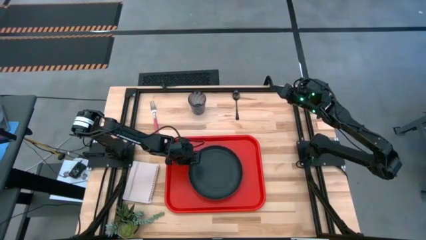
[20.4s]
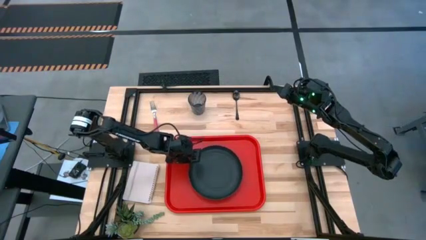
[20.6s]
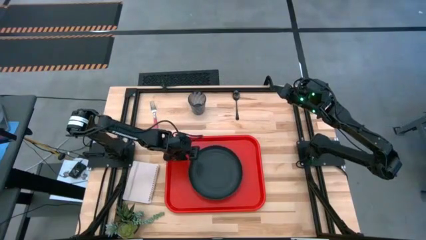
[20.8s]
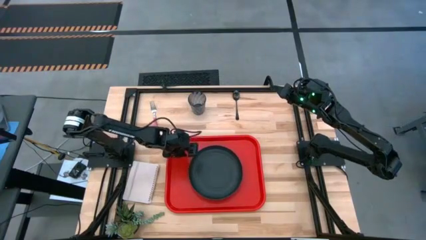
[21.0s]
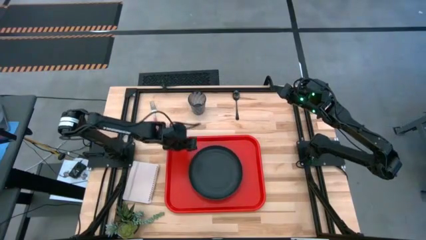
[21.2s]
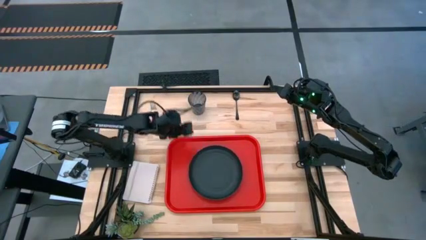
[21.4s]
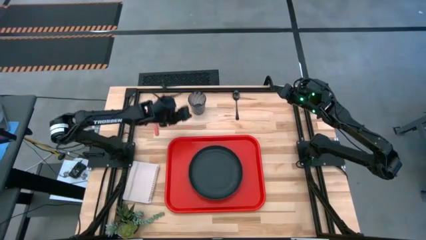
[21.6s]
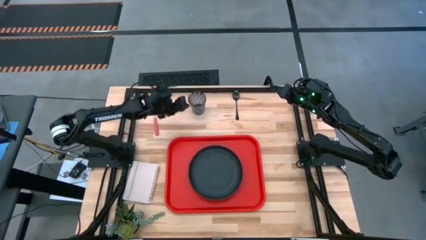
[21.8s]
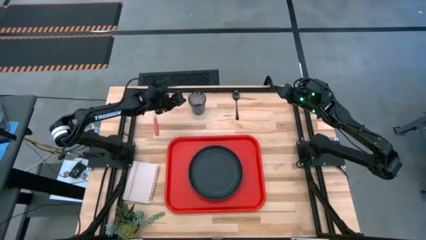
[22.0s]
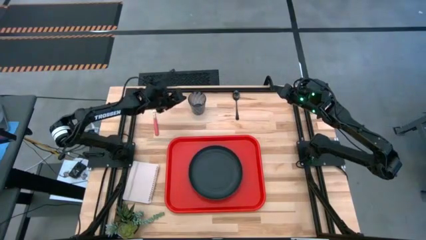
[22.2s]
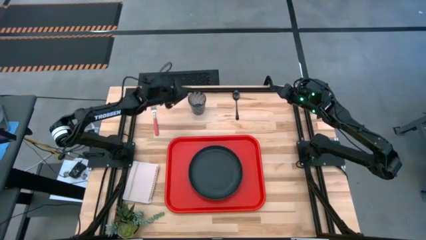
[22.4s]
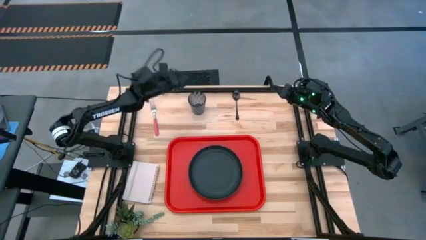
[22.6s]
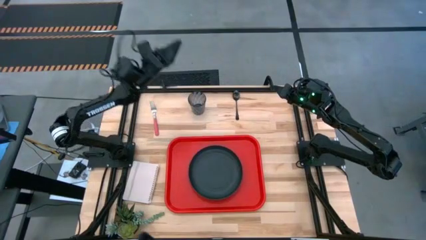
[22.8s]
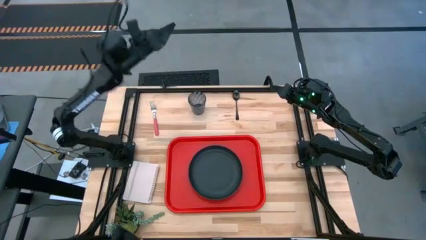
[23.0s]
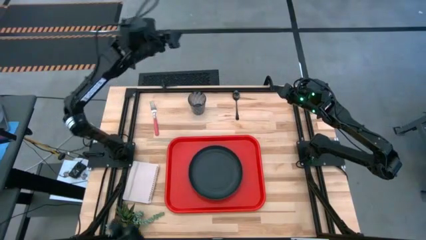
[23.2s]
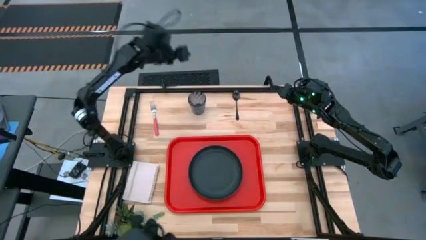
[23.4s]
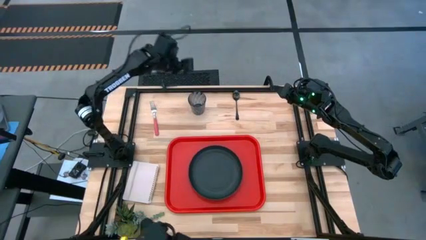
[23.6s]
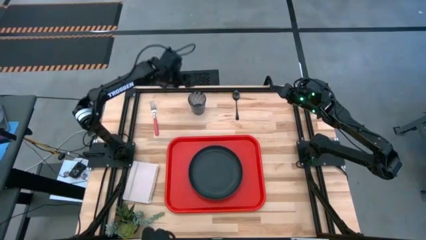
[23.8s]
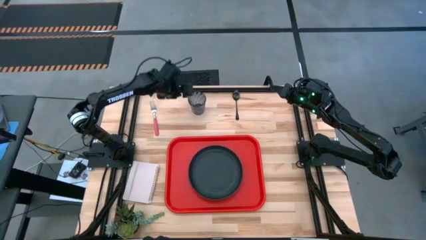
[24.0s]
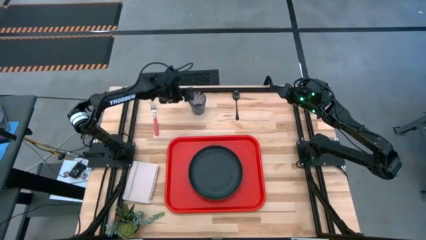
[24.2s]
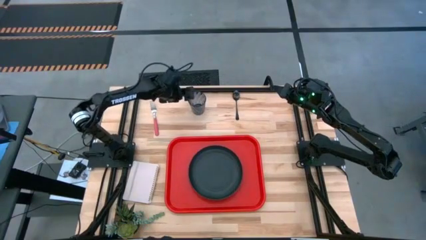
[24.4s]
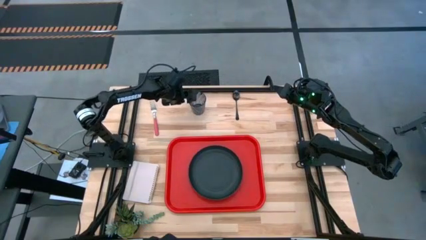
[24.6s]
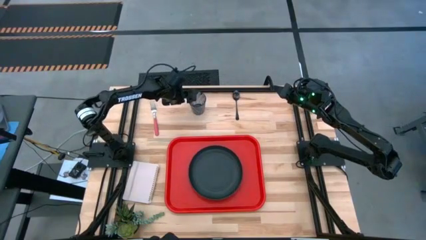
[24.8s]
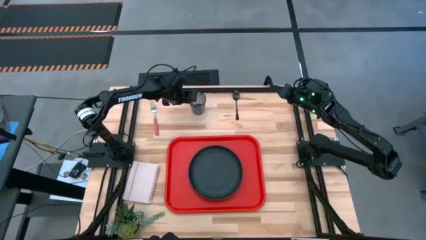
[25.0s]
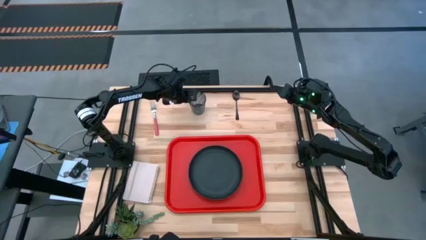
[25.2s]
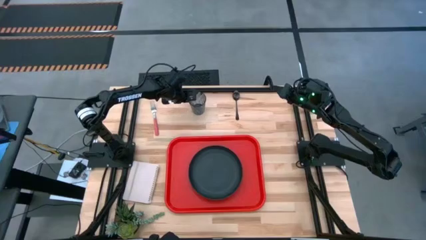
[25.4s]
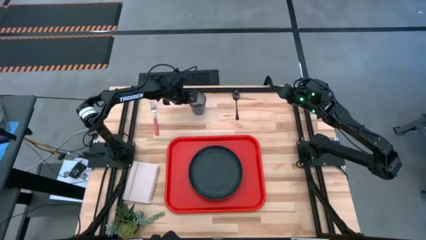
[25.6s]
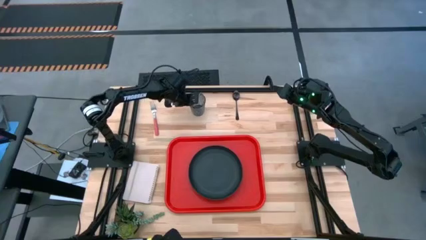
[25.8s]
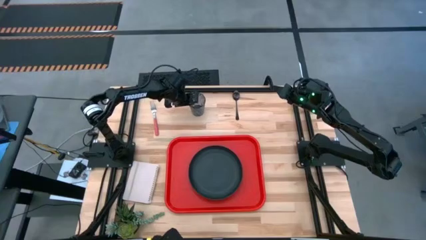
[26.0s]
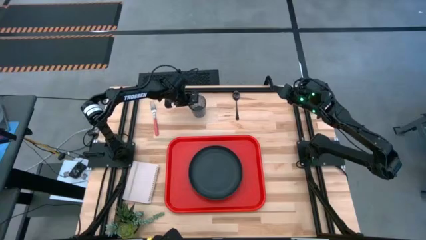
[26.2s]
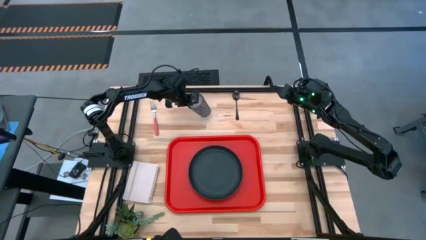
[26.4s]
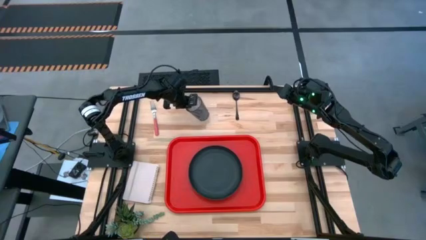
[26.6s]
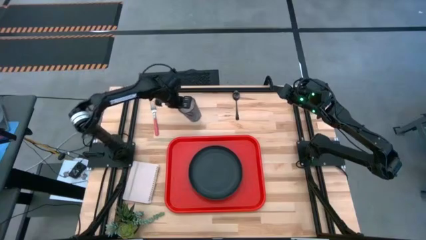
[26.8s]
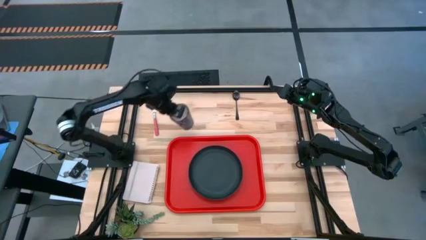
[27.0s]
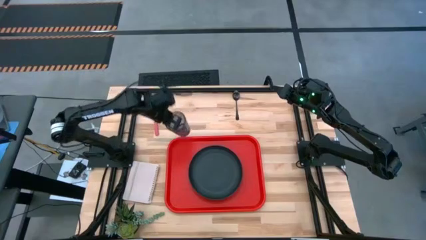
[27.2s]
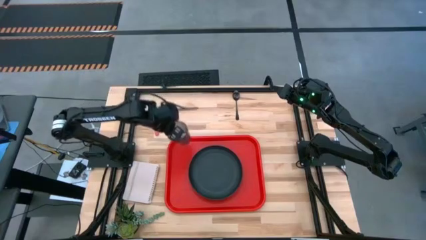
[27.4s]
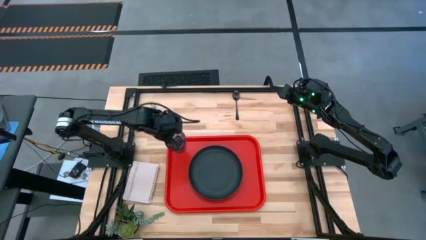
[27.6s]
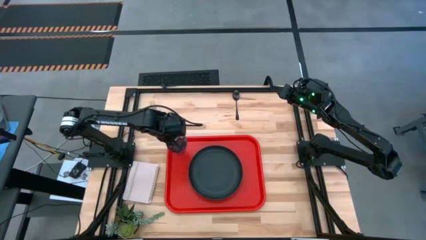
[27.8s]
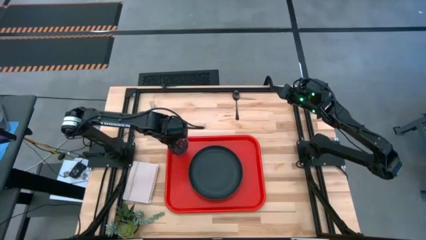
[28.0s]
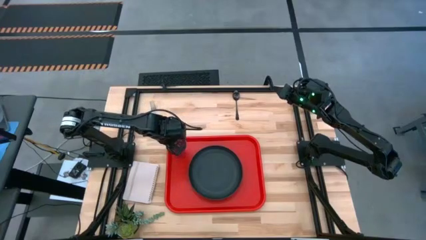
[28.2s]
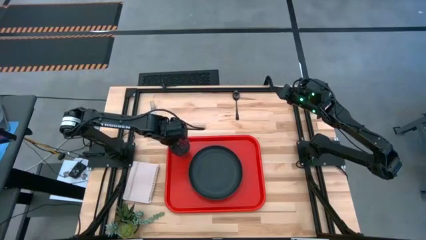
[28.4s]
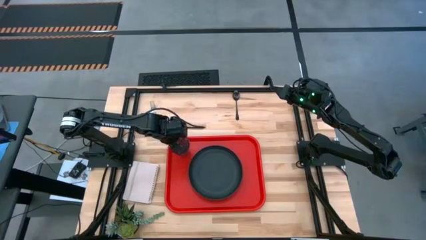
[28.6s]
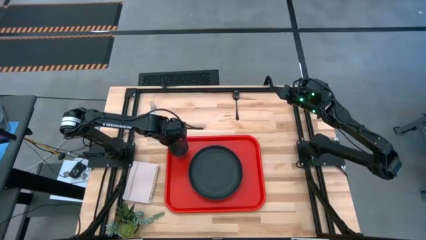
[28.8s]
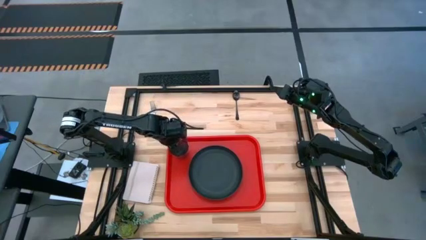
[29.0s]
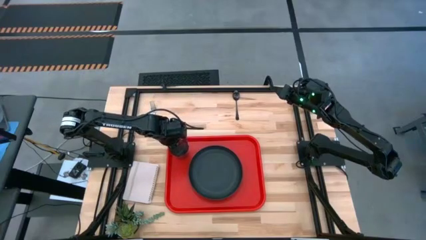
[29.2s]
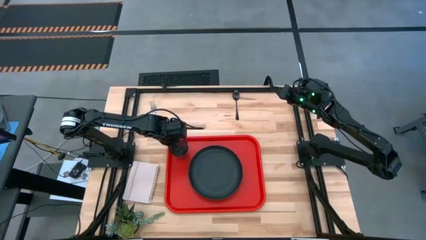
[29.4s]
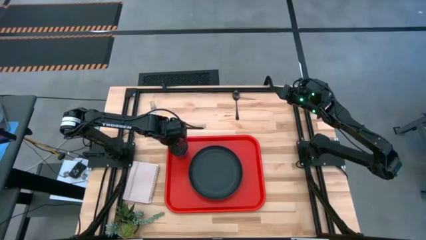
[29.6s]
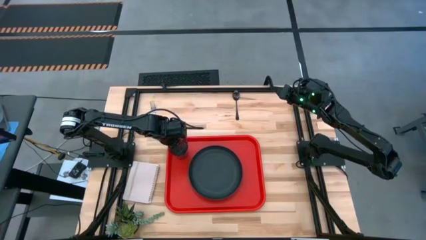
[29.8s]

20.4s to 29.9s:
Task: Pick and place plate/cup/fork/spoon on tray
Put the black cup on the orange serving tray to the top left of the black plate

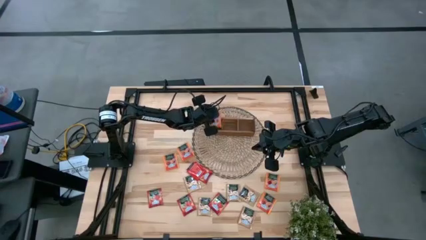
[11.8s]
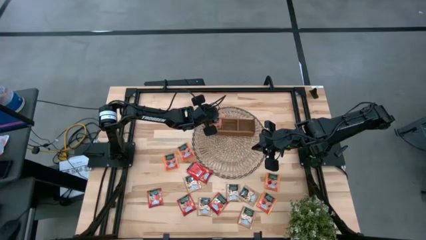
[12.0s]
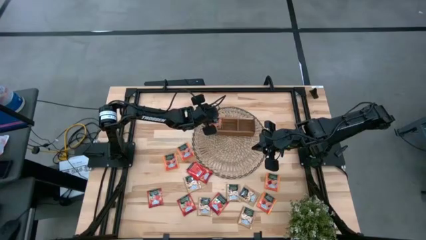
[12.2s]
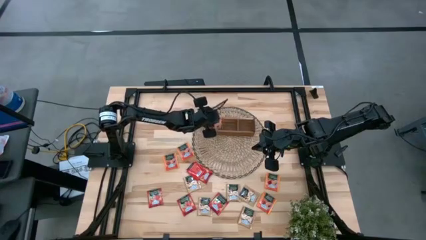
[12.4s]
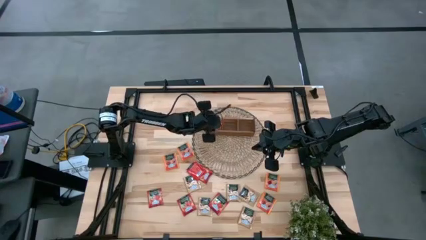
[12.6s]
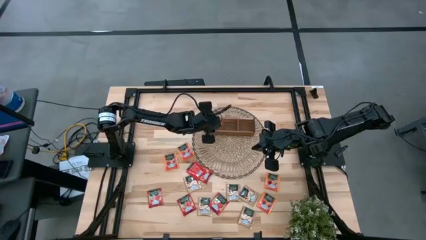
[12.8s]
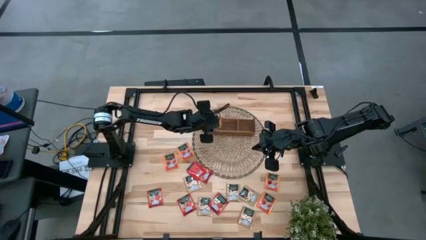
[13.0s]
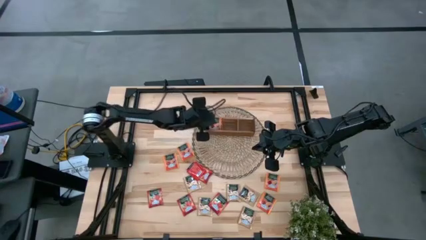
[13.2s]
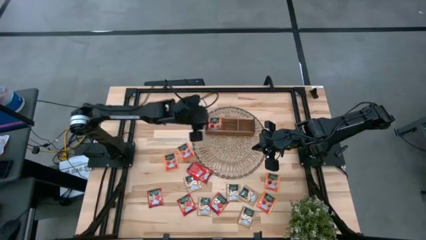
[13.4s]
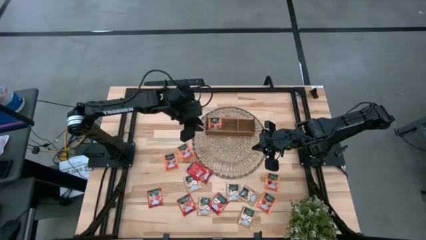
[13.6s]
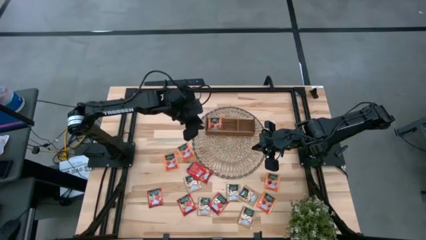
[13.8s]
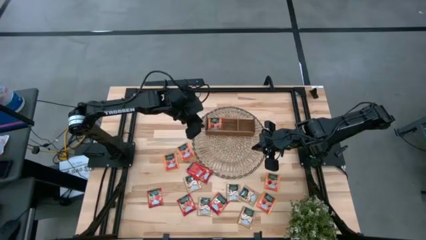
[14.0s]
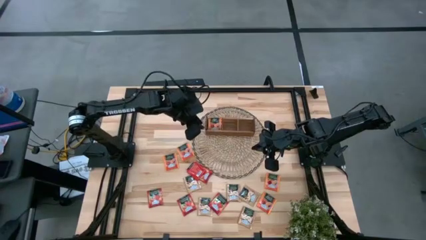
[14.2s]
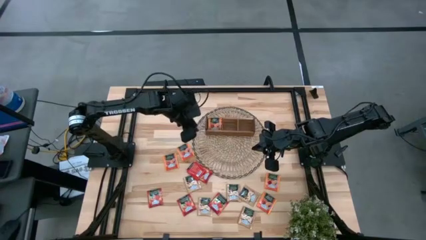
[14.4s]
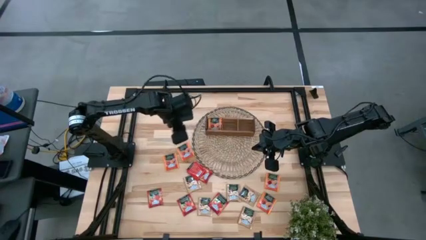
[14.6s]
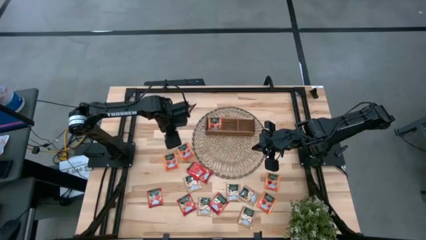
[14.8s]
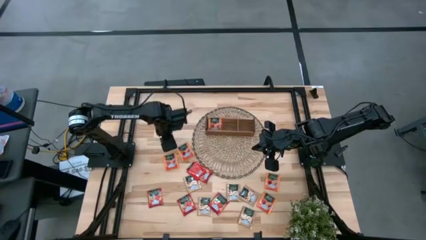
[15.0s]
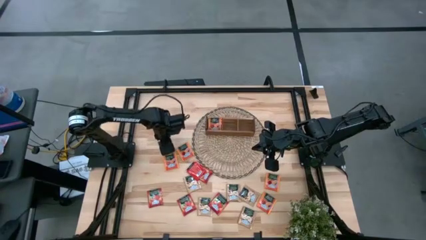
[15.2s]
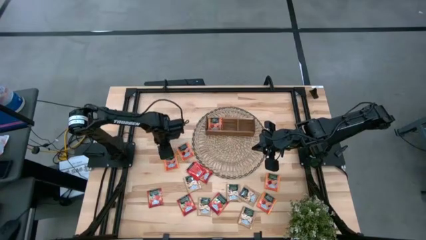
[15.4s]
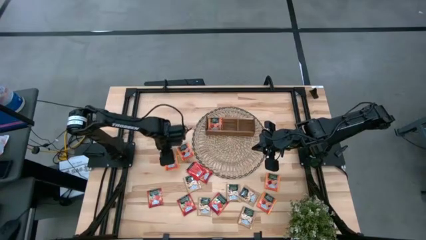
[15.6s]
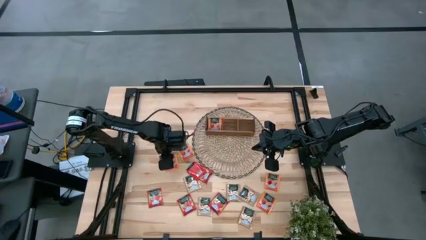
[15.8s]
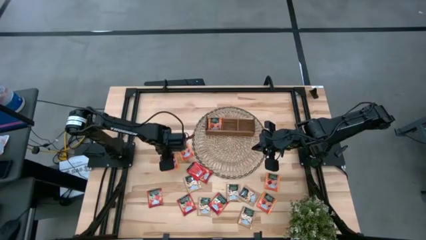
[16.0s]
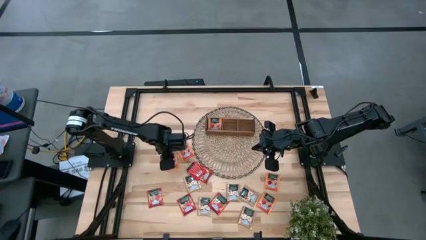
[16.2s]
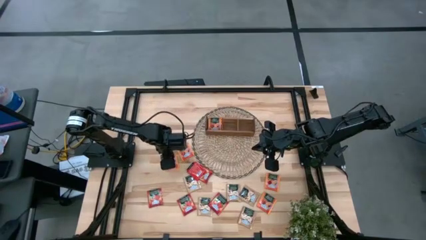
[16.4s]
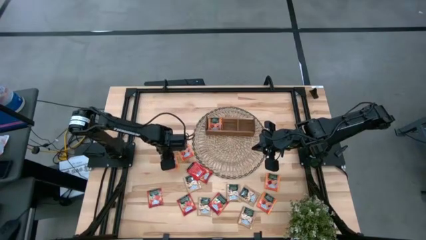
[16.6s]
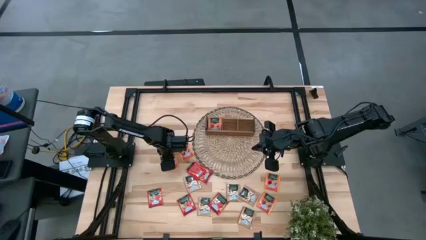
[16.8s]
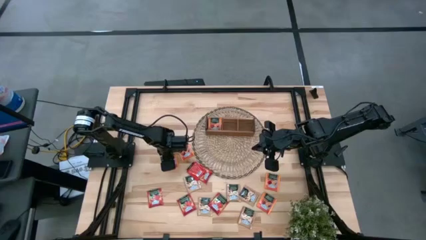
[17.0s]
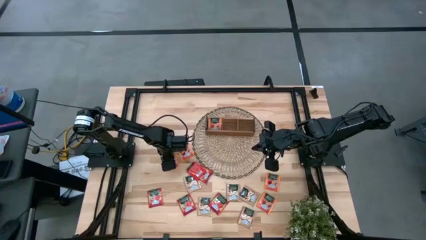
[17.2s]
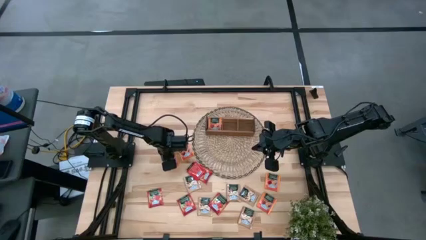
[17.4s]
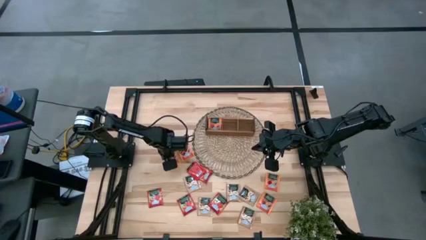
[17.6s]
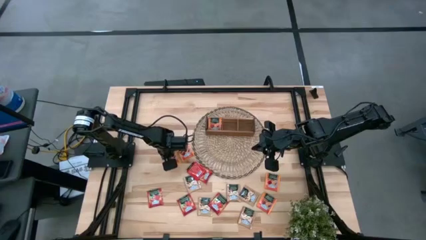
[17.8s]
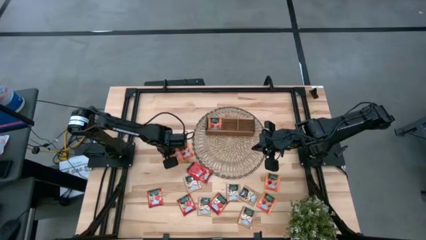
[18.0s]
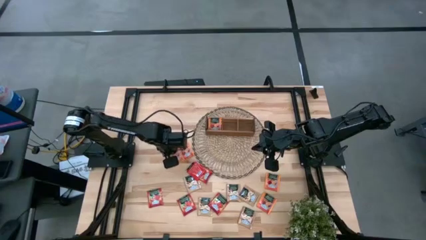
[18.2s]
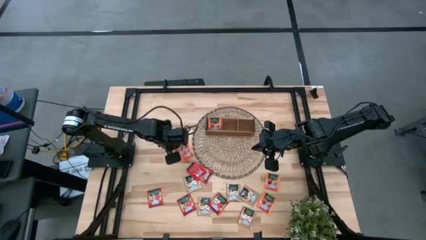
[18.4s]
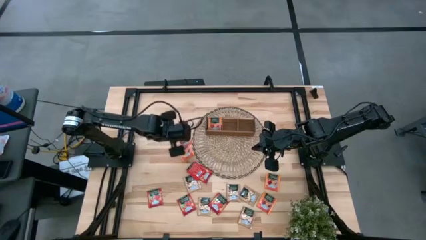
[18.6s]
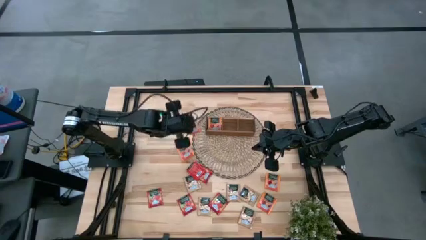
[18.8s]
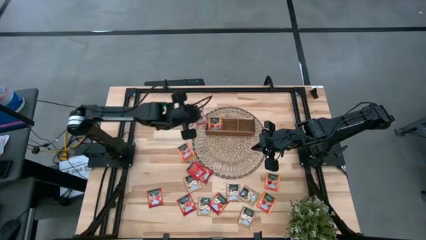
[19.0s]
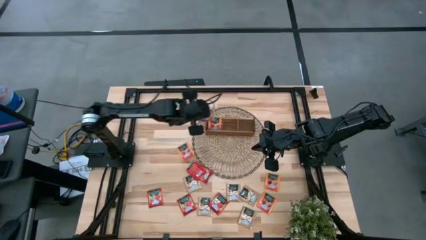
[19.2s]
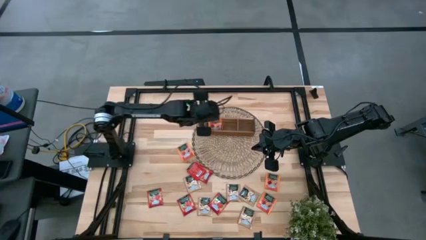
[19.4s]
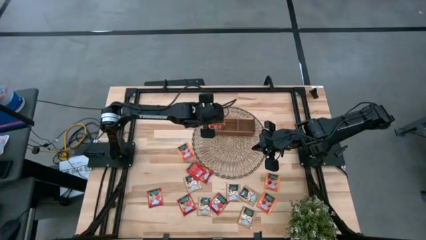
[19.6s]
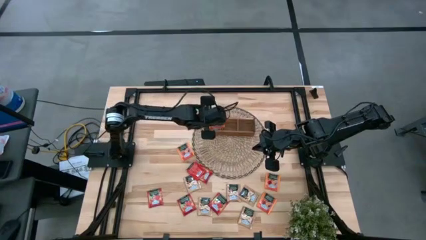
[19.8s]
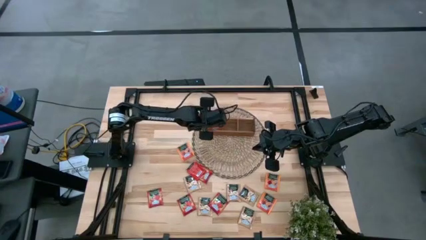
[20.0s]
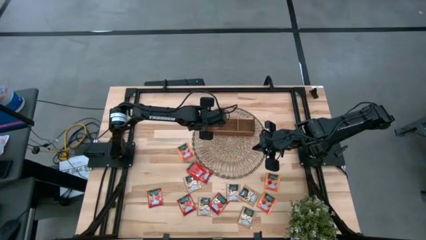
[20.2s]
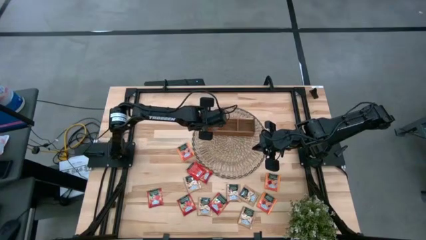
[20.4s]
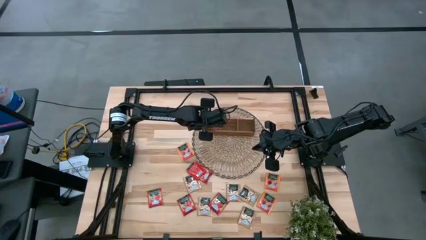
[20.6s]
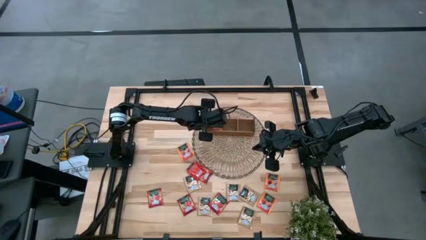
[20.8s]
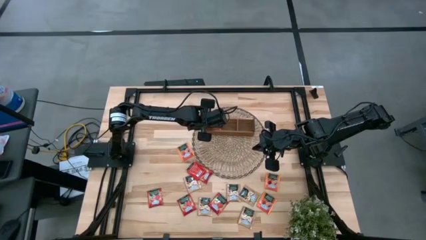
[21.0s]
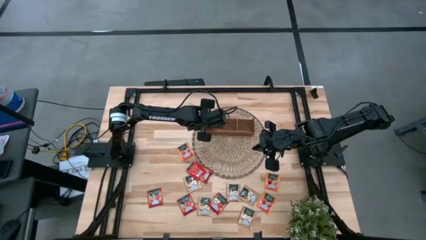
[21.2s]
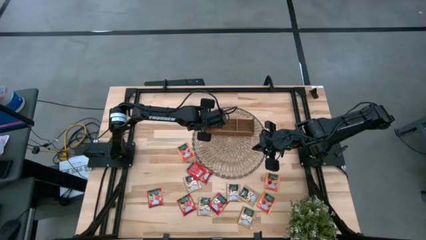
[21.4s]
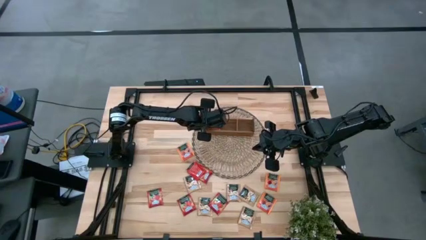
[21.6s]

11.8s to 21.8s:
Task: Pick & Place Tea
Put the orange tea bag into the left section of the wooden organizer
